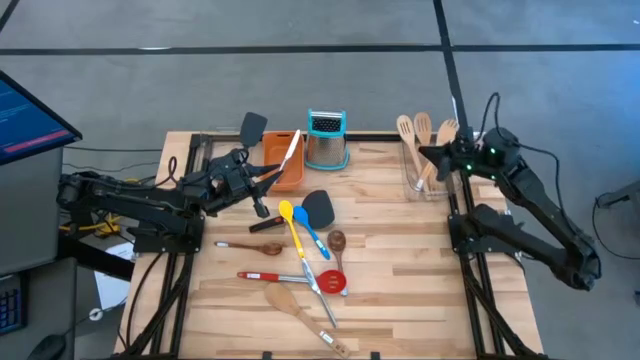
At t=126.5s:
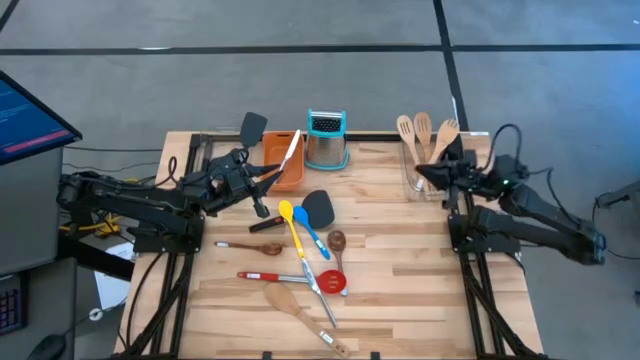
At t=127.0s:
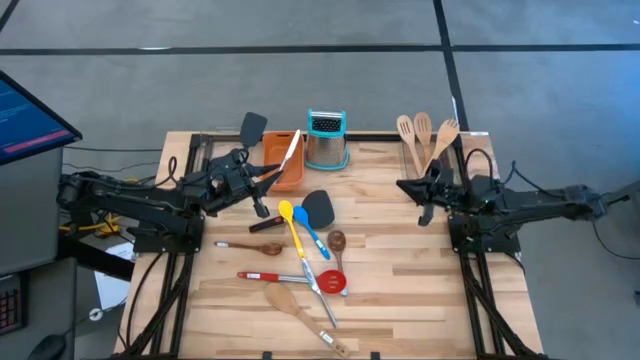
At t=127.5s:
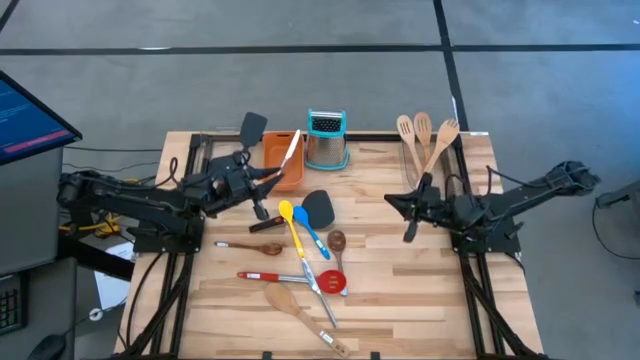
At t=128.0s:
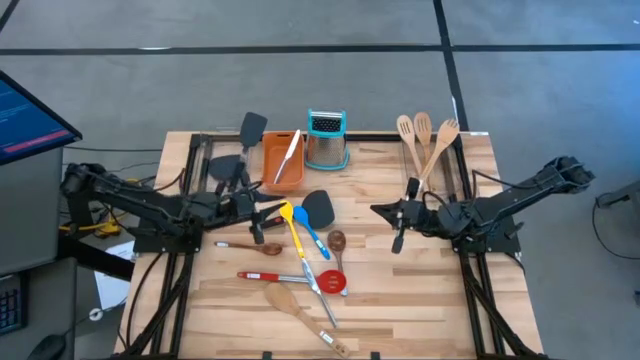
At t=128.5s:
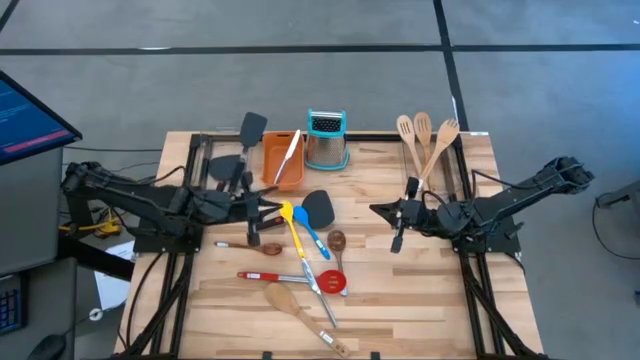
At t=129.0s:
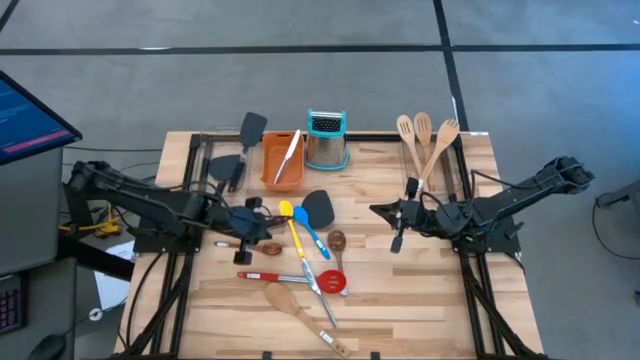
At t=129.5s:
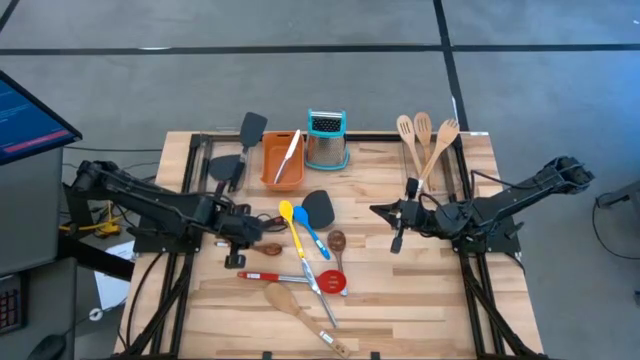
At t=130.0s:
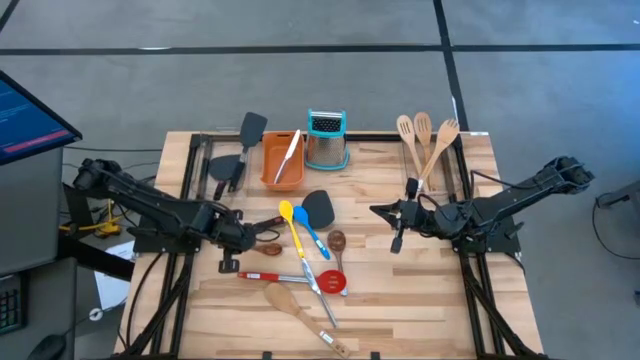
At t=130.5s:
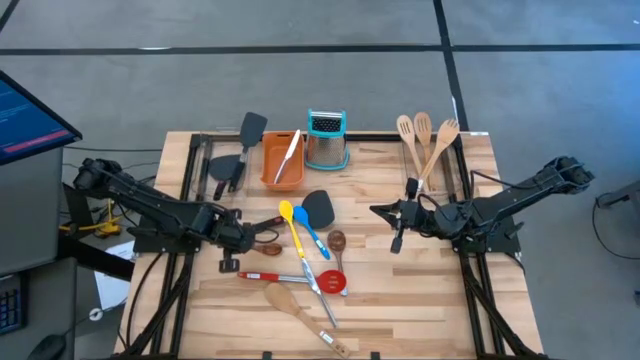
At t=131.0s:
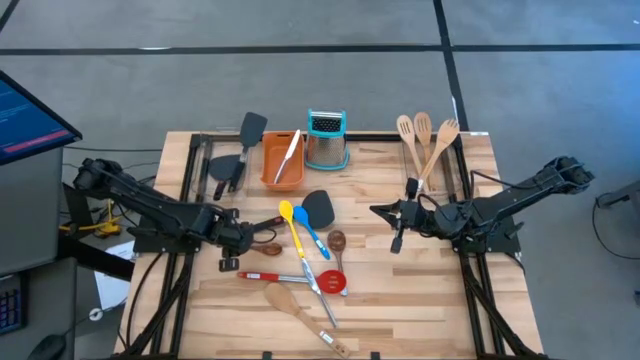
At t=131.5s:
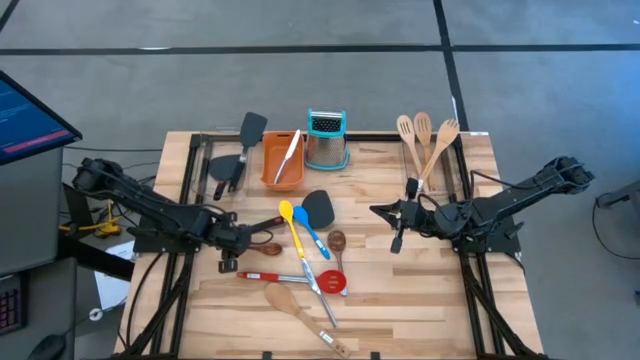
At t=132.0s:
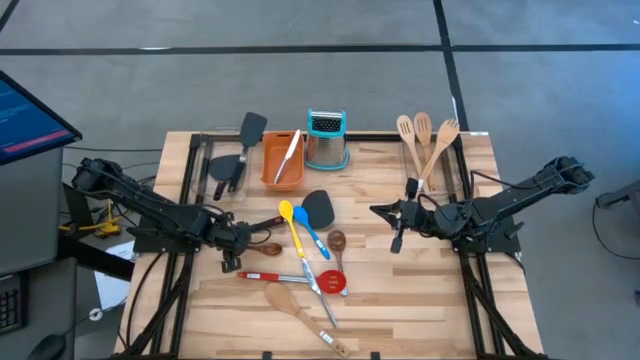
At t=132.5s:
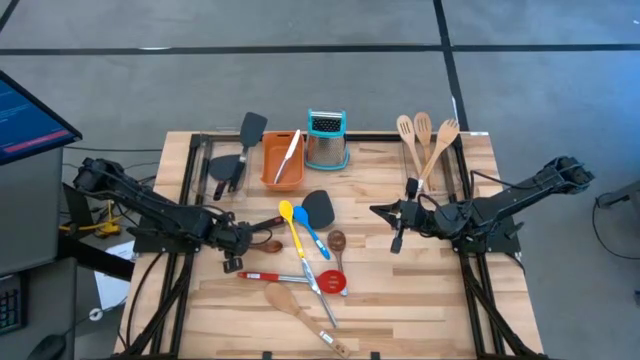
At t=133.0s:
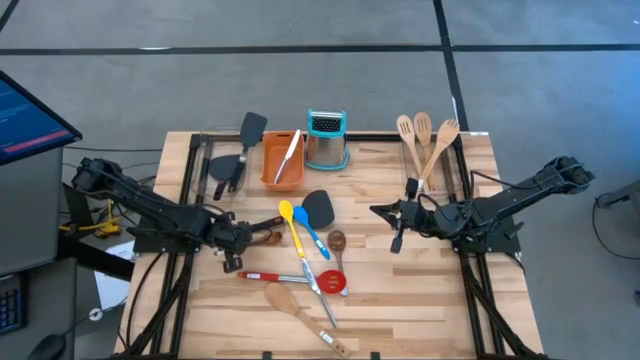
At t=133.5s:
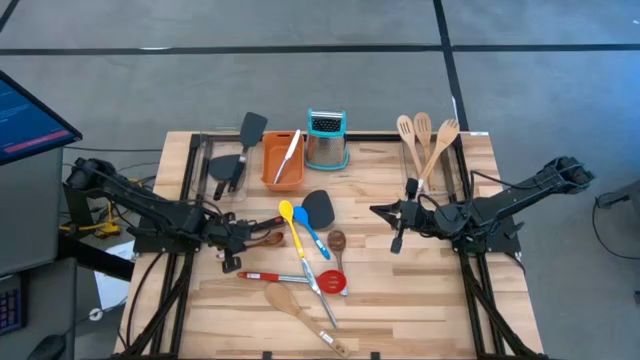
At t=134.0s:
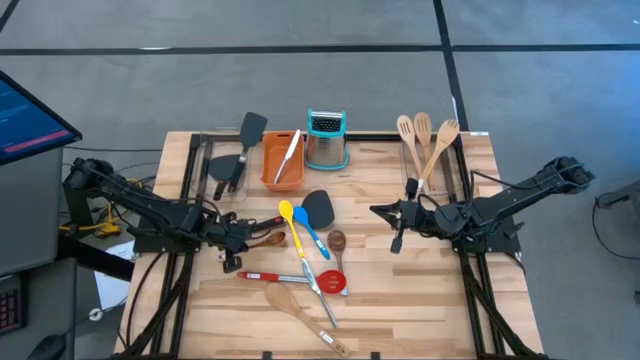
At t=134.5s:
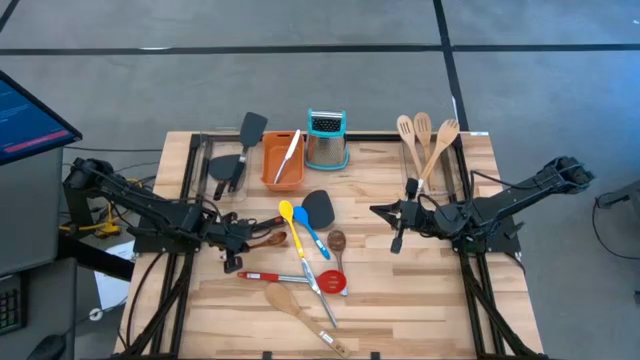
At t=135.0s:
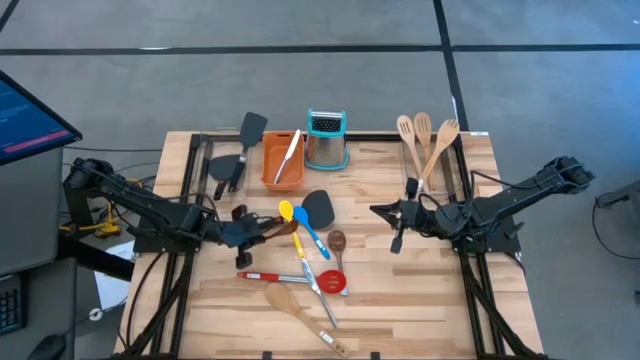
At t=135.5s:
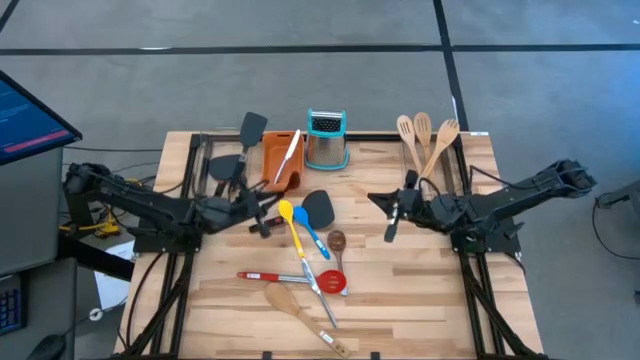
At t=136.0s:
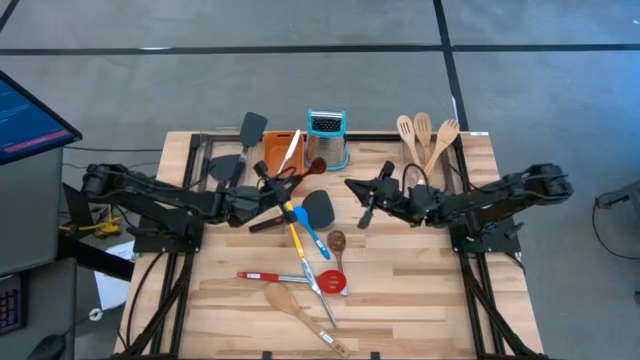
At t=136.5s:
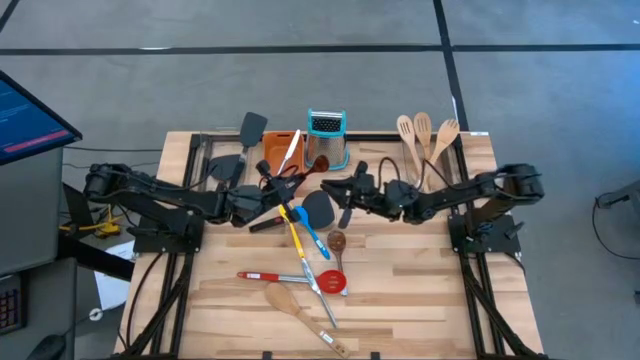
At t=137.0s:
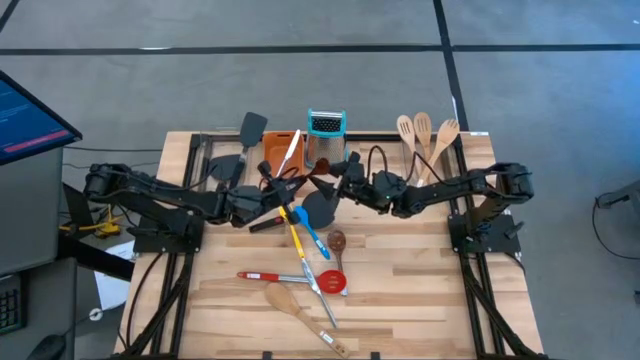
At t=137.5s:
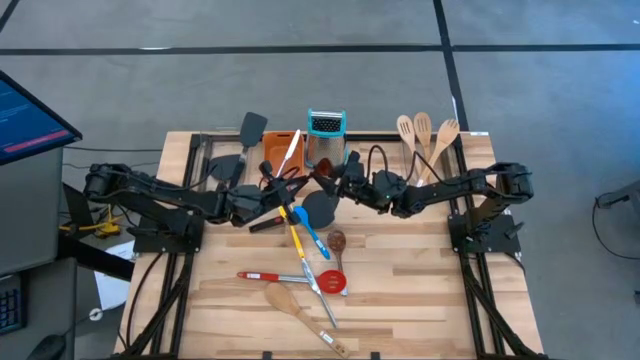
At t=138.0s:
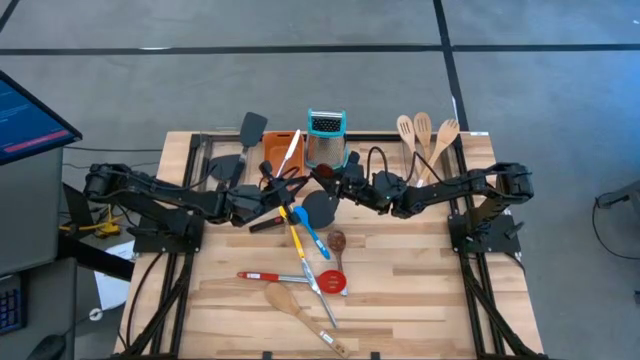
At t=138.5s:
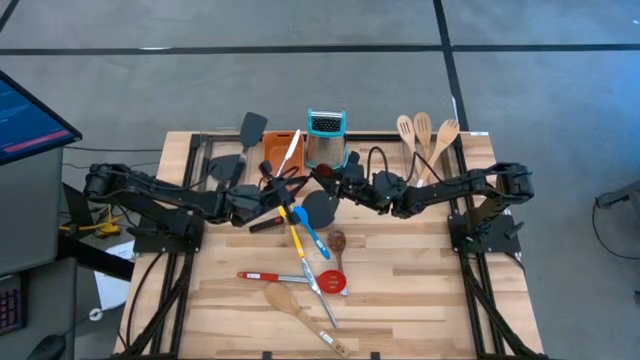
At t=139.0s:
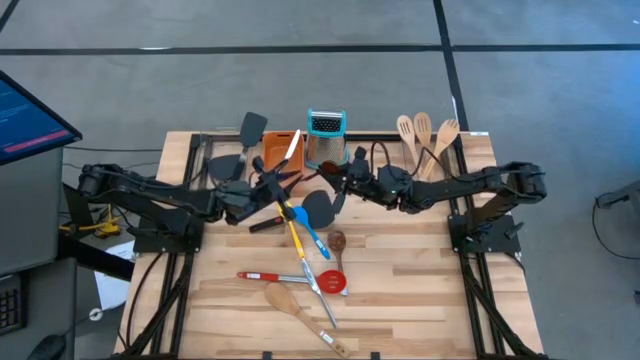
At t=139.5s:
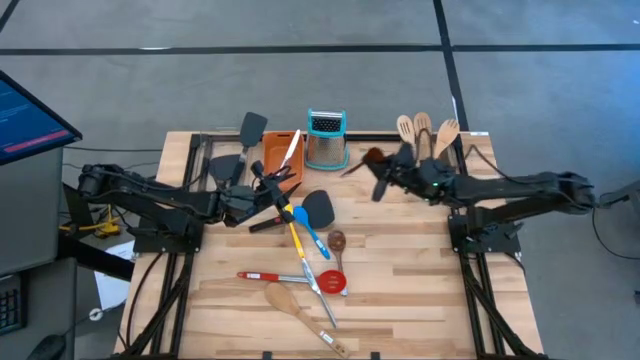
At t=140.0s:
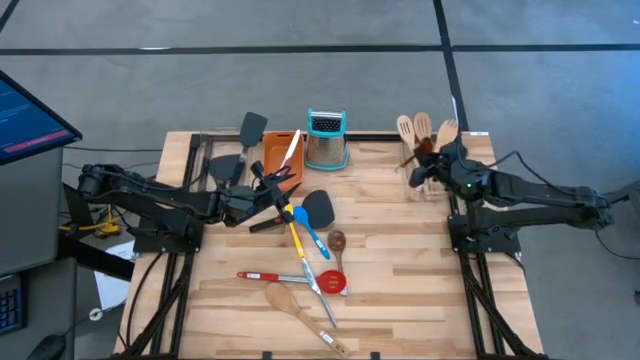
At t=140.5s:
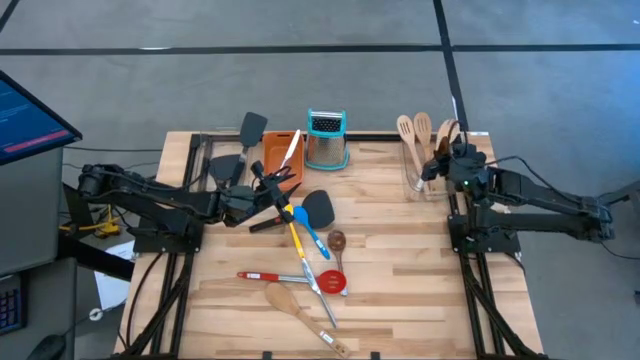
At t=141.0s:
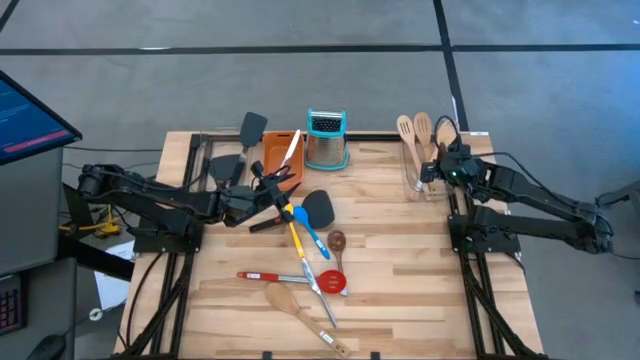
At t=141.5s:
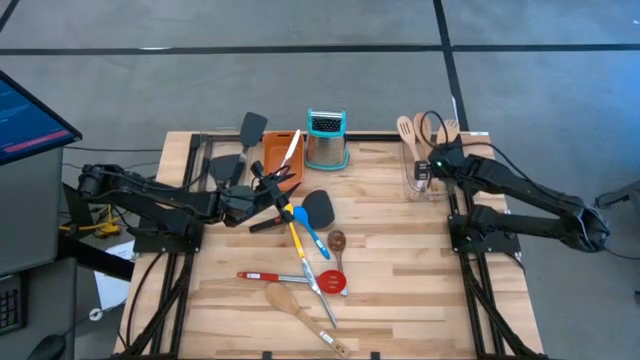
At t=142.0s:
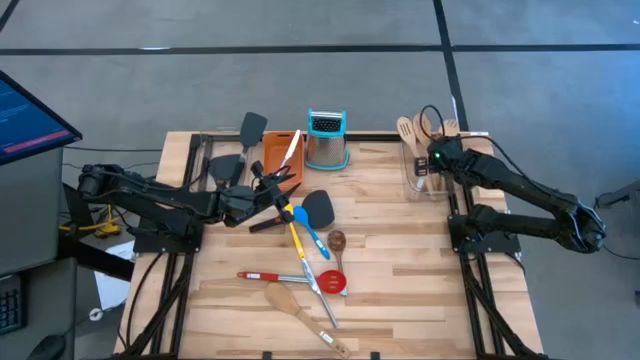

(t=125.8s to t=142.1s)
Task: Pick & Place Kitchen Items
Put the left dark brown wooden spoon into the right transparent bin

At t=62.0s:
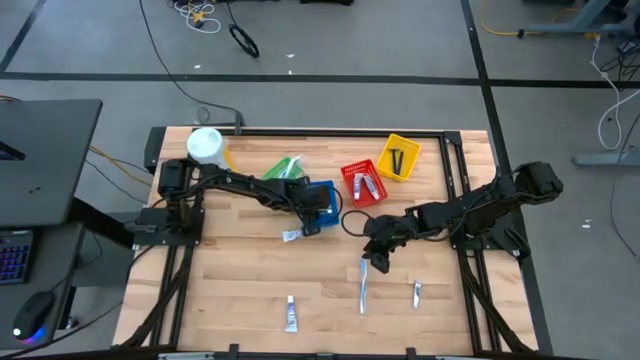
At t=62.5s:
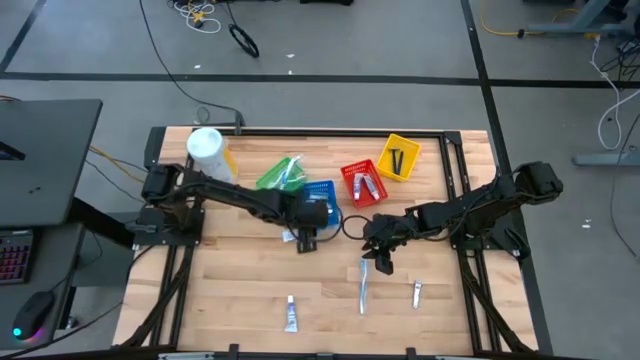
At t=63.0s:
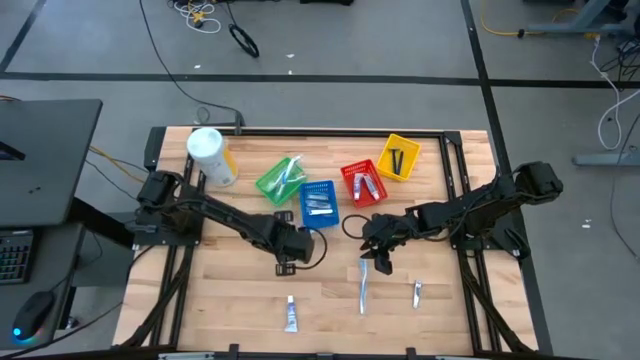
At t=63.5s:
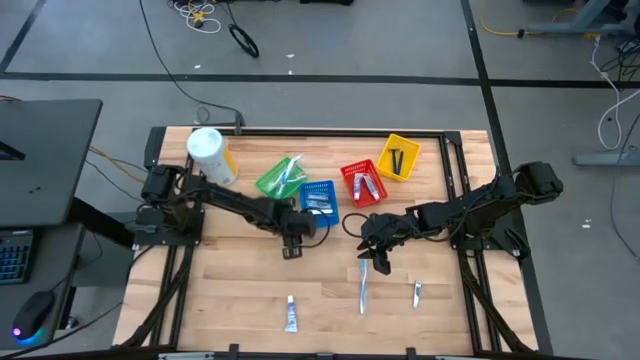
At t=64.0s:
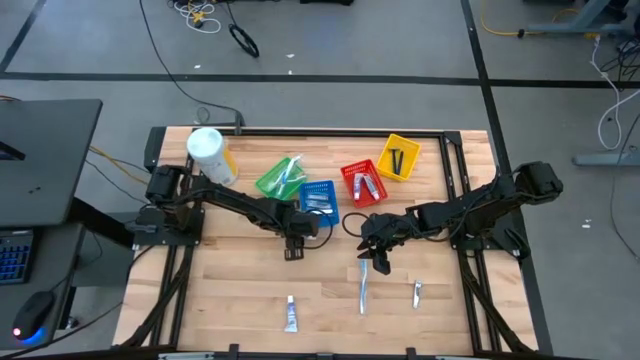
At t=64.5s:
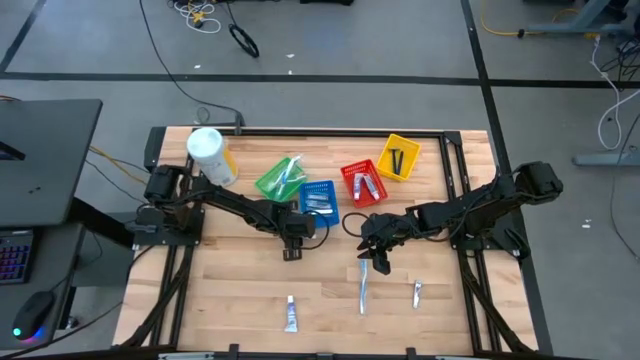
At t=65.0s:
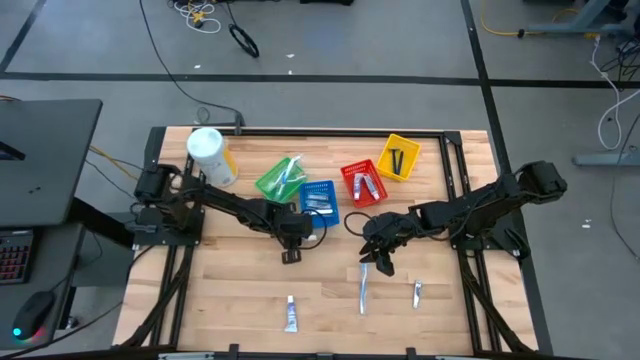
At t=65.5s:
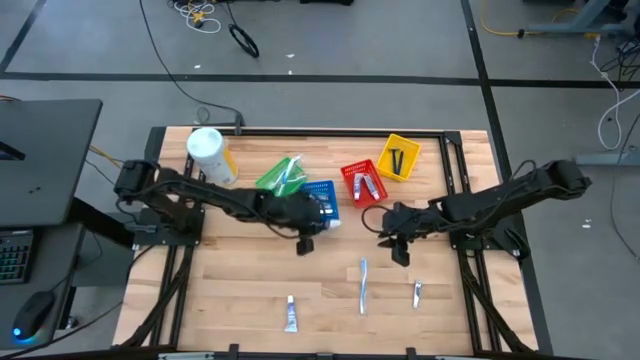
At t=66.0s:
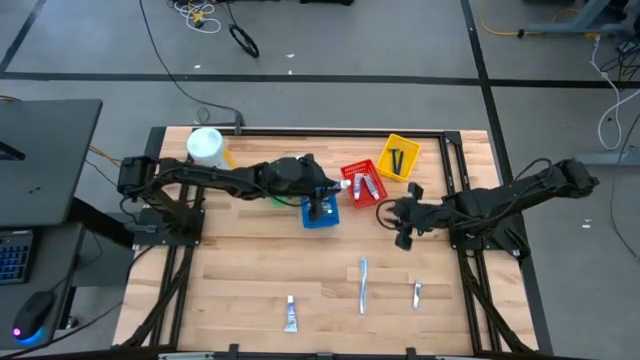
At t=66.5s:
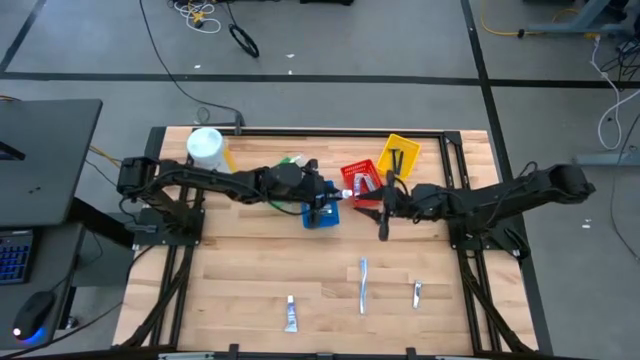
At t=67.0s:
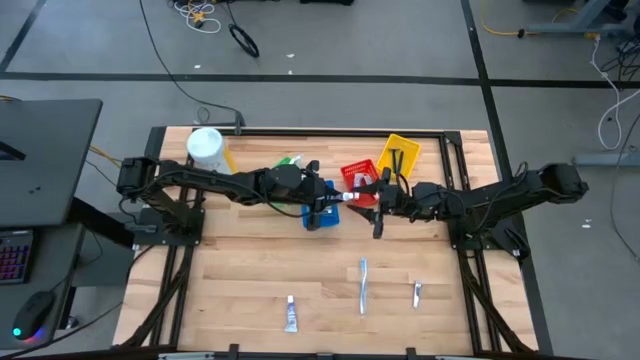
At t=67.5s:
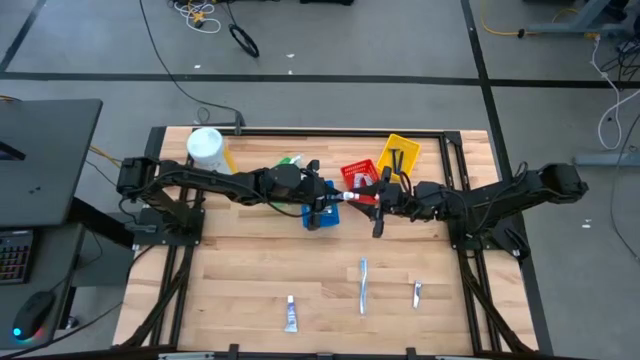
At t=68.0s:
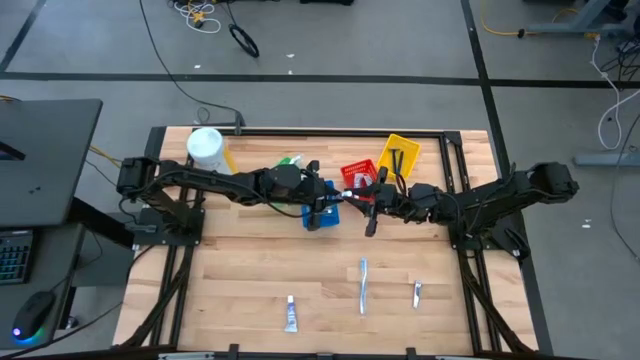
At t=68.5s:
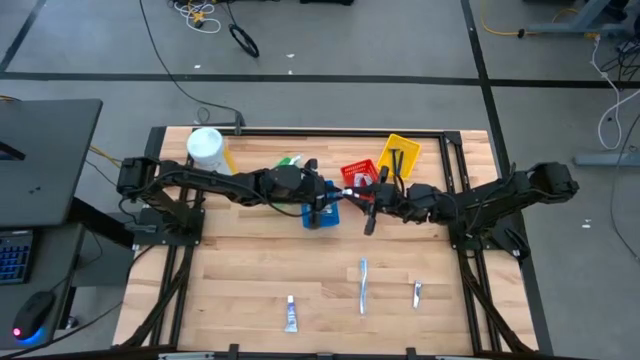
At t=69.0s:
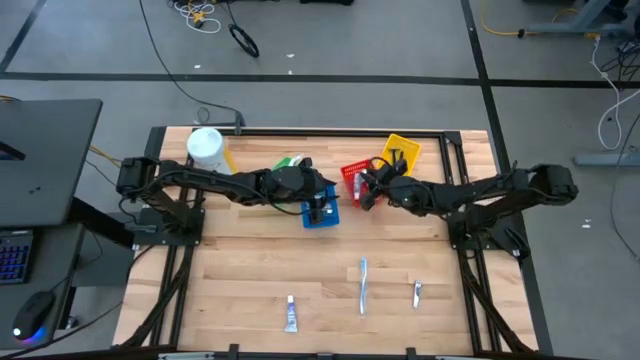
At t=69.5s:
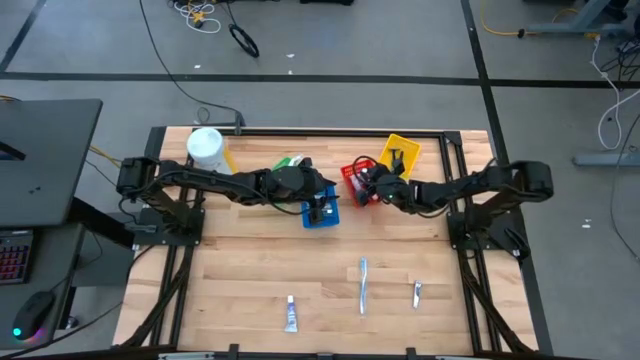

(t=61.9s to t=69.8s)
Task: Pick & Place Travel size toiletries
Put the top toothpaste into the red bin
